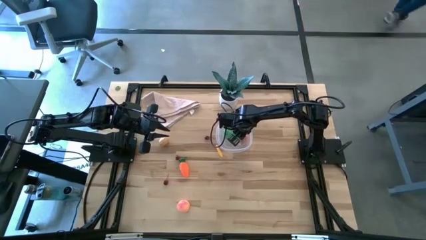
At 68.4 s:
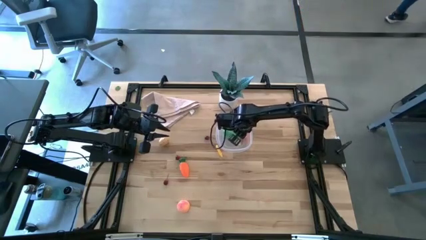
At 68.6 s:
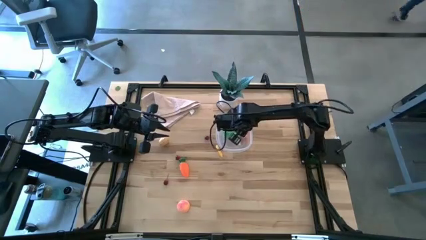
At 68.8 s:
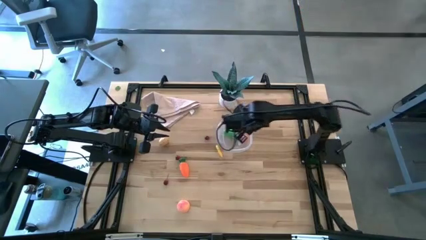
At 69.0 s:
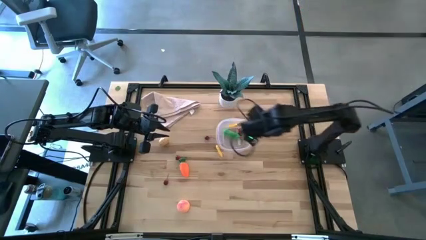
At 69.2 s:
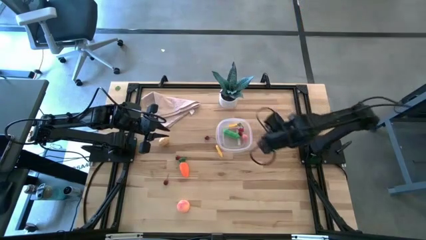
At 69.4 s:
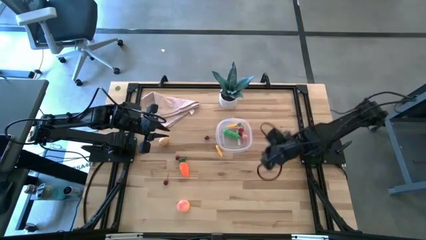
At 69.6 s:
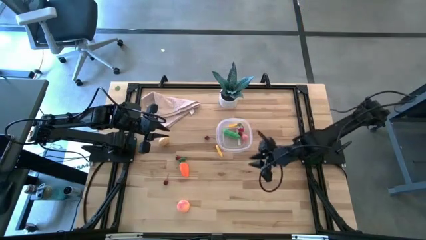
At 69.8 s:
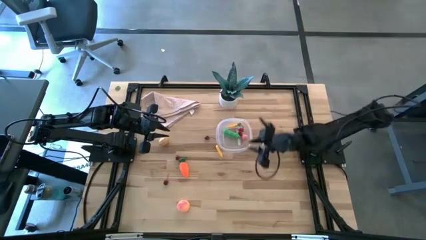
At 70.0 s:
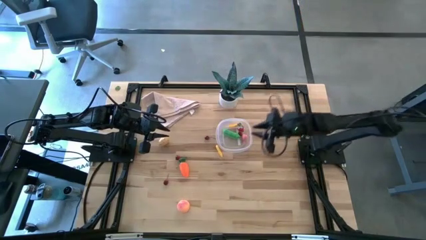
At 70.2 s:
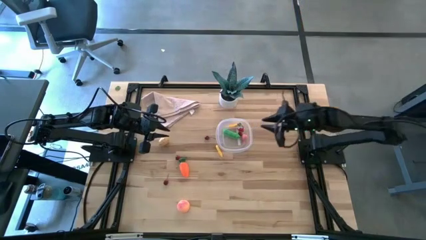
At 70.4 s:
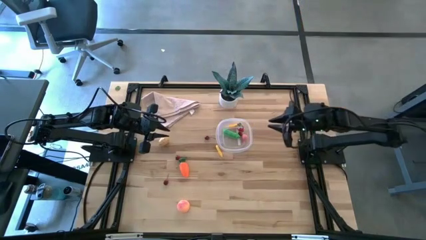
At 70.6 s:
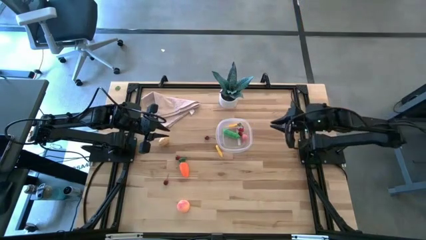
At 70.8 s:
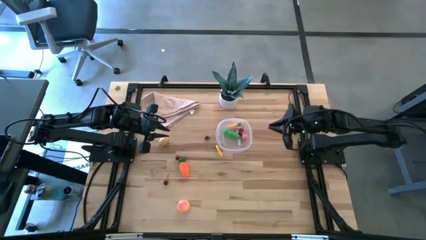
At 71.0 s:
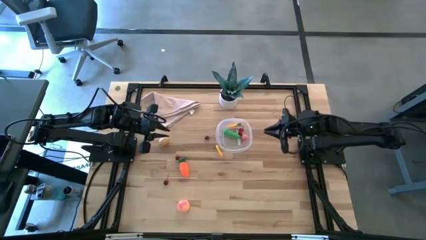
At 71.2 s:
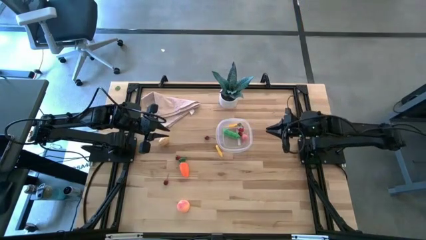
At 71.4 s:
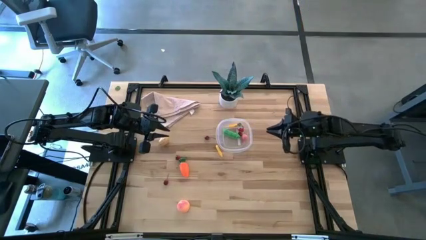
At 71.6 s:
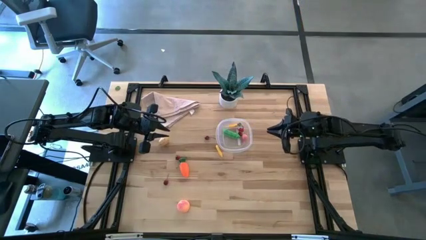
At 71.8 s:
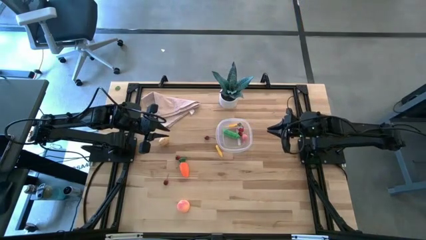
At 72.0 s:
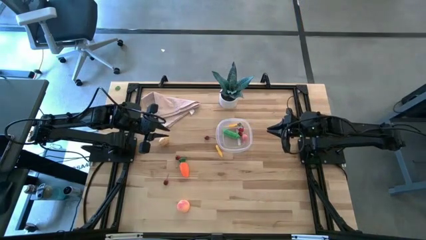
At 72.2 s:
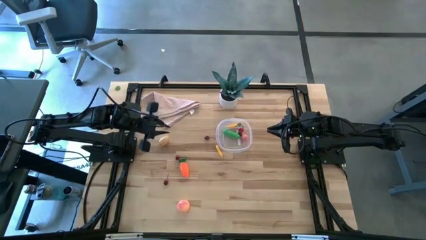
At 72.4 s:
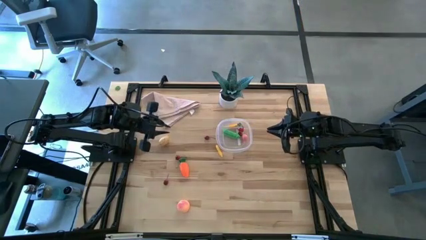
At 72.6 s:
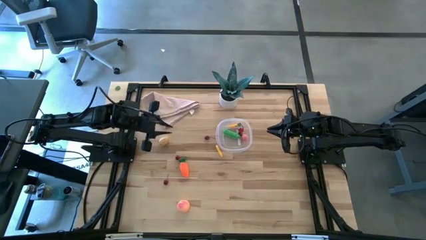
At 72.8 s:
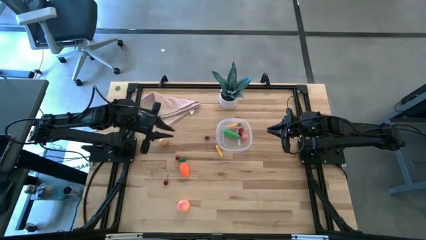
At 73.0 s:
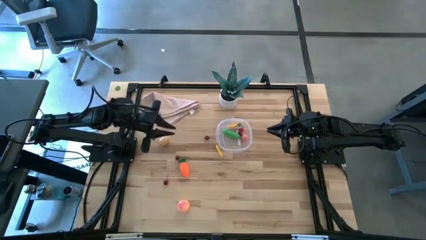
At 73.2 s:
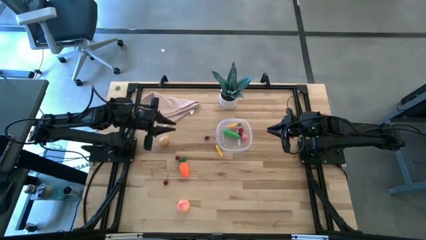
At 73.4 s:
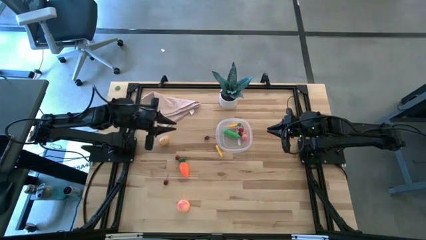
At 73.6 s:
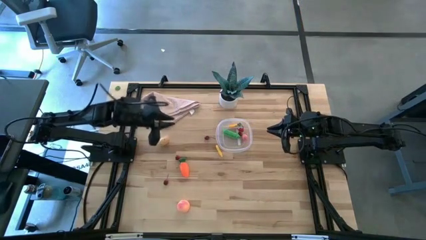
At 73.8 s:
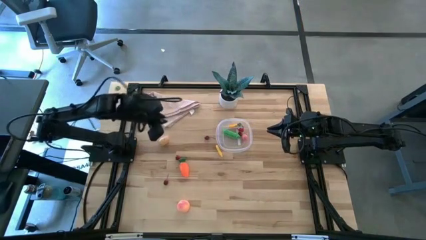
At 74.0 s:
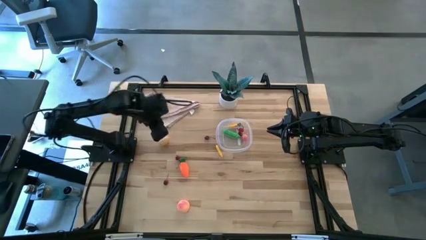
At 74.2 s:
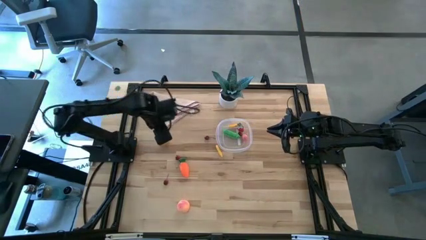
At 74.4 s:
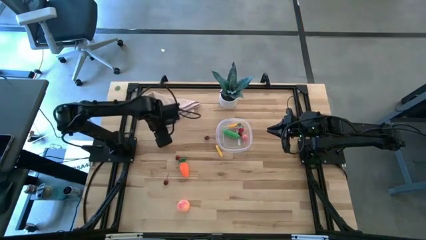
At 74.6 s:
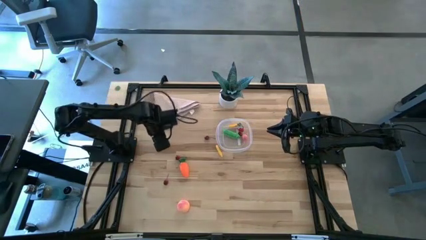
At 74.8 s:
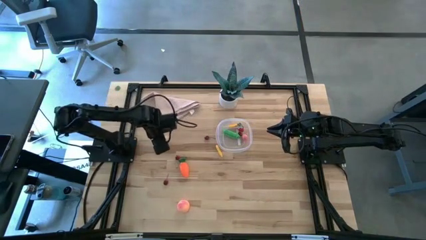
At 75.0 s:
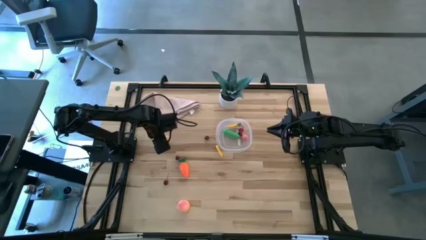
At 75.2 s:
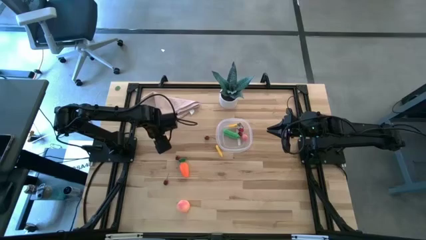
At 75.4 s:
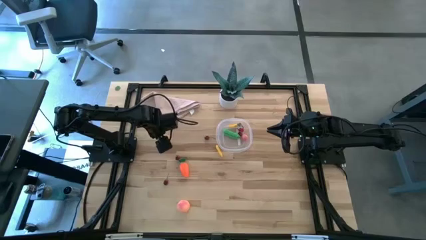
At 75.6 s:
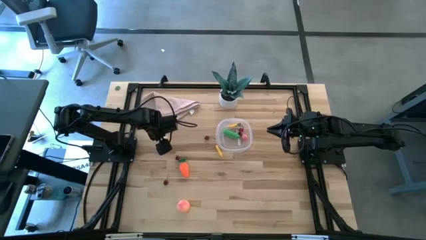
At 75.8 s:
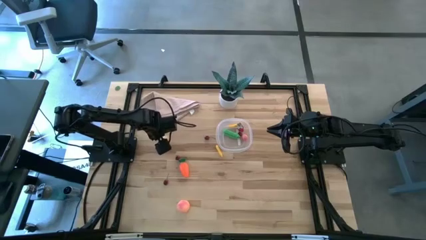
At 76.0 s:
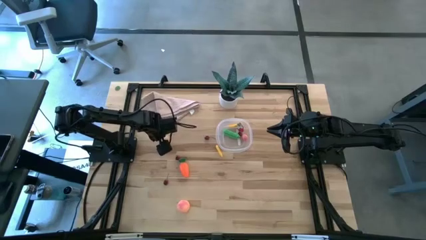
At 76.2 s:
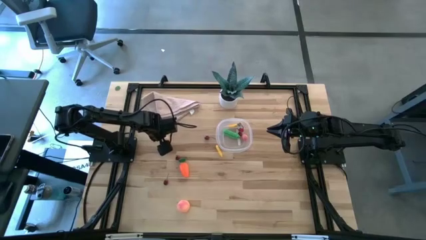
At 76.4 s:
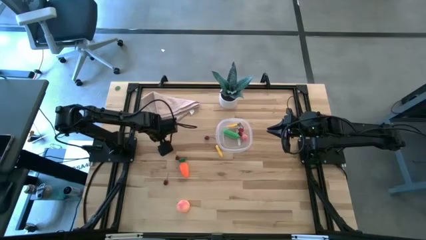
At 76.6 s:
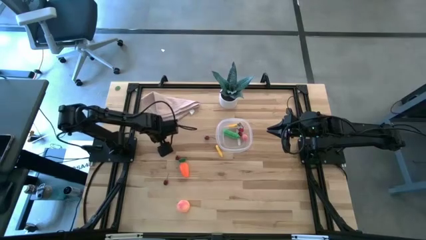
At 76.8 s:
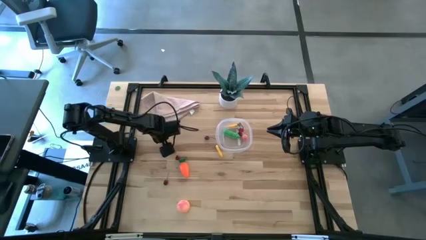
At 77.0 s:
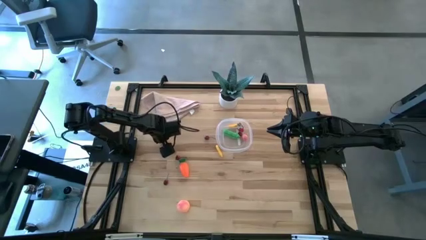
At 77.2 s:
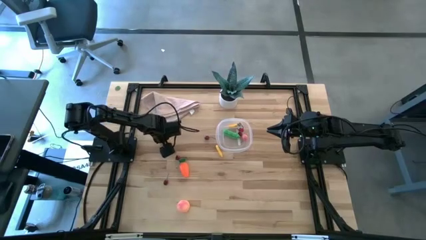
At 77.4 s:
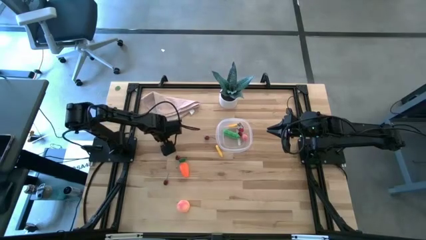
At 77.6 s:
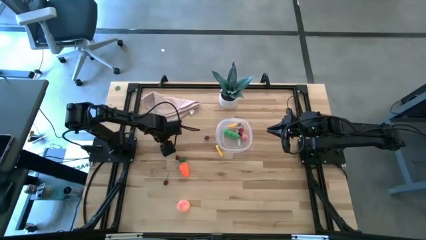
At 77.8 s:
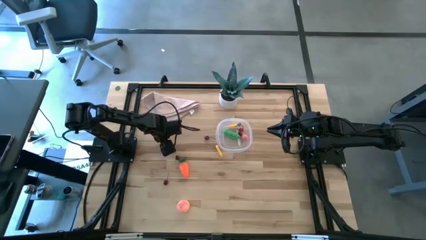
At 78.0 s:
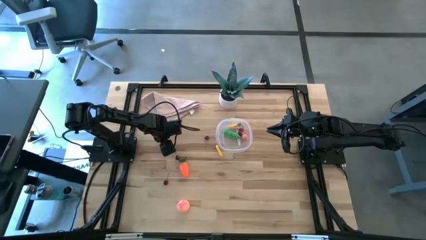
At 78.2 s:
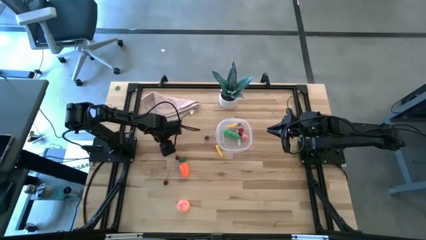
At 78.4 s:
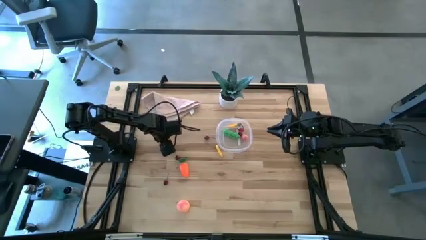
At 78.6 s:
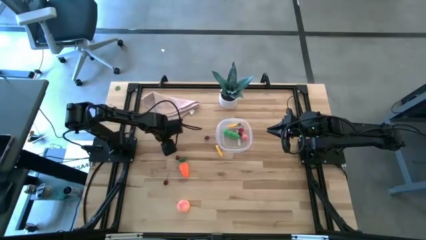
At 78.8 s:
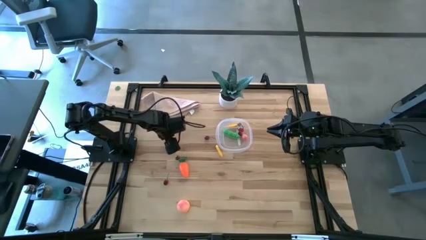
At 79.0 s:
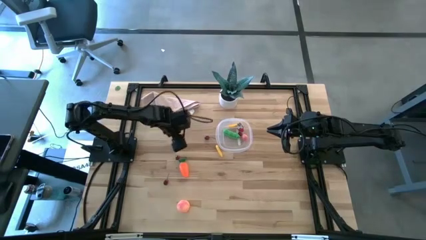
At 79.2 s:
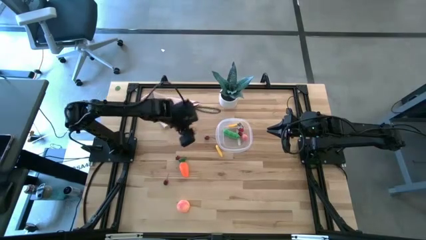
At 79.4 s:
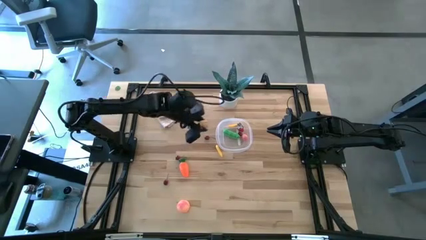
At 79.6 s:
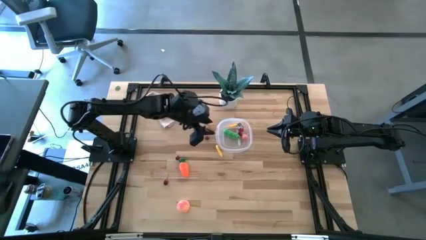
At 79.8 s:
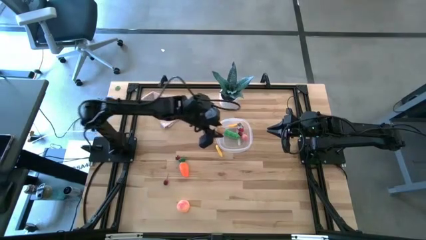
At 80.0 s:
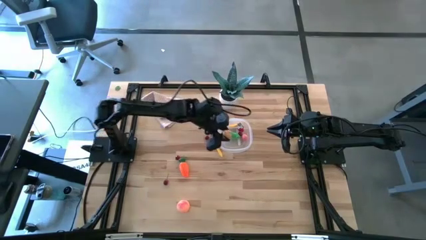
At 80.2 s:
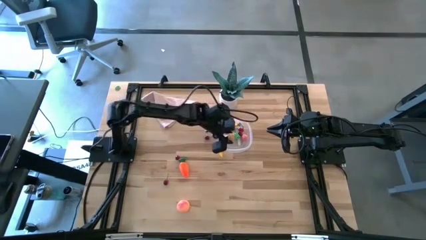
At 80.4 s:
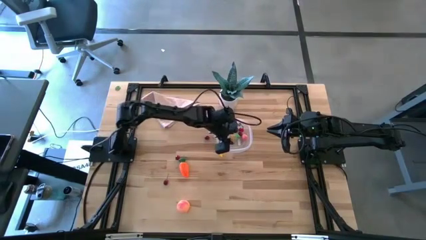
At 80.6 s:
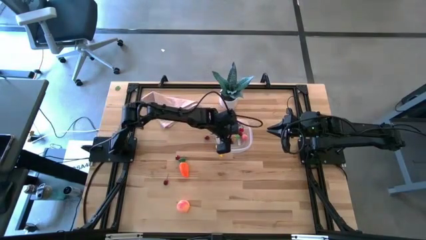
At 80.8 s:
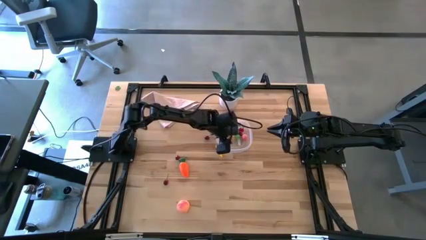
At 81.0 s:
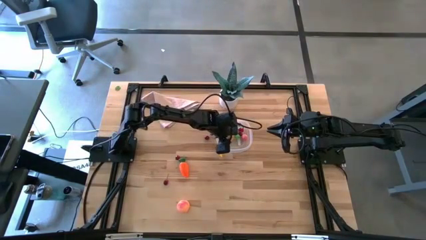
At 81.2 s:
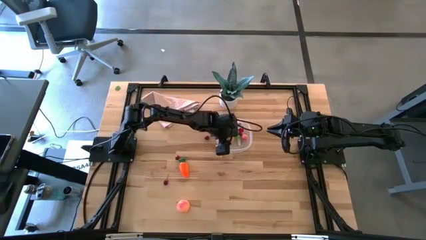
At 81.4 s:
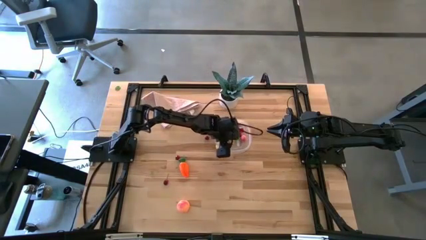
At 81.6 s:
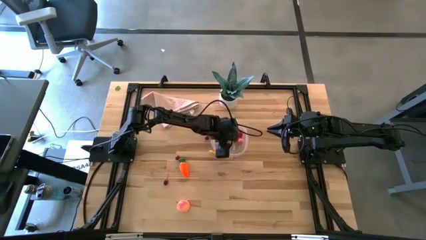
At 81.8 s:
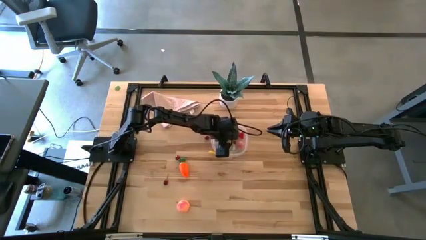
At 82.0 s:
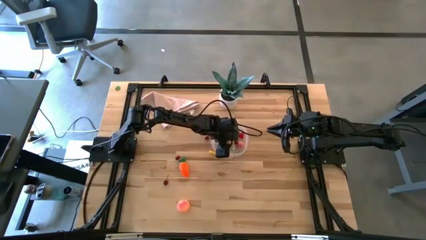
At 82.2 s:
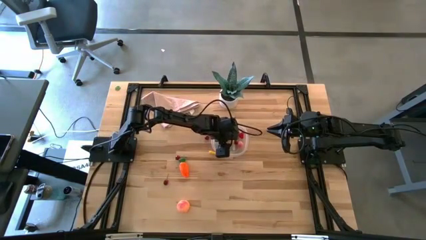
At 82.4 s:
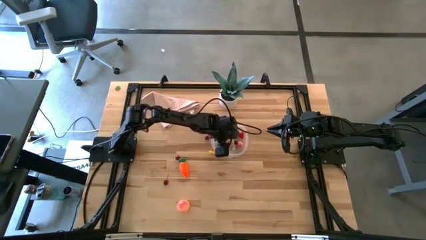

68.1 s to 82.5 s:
Task: Pick and placing Produce into tupperware
Put the potato into the transparent bin
